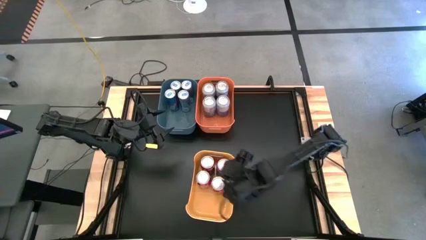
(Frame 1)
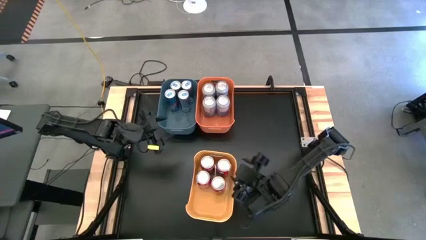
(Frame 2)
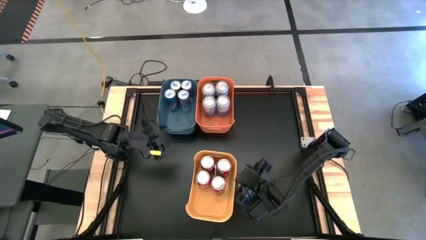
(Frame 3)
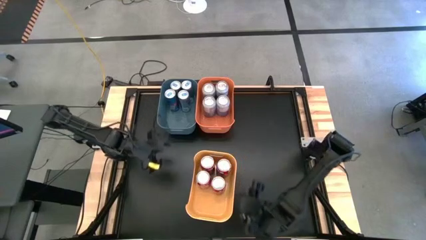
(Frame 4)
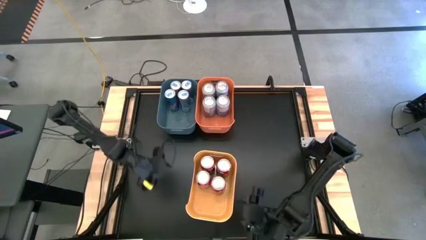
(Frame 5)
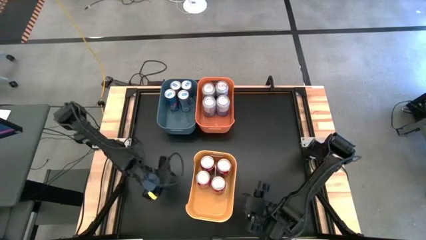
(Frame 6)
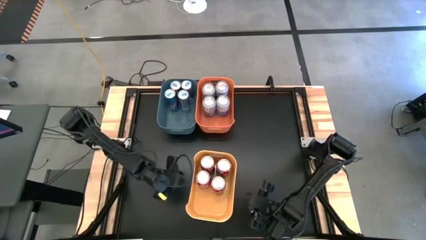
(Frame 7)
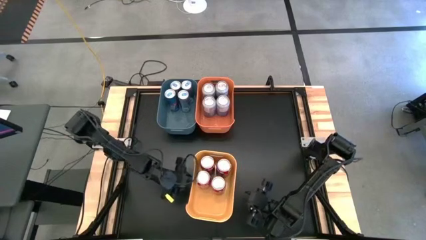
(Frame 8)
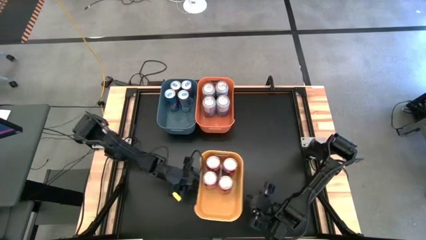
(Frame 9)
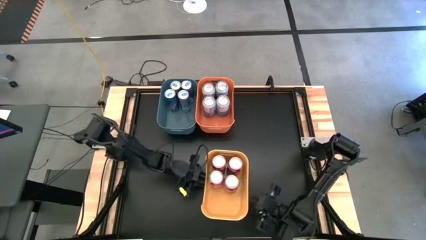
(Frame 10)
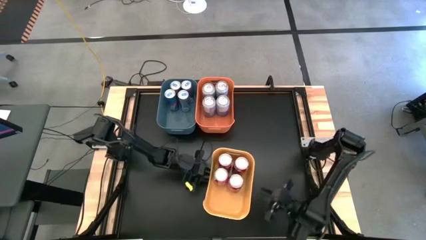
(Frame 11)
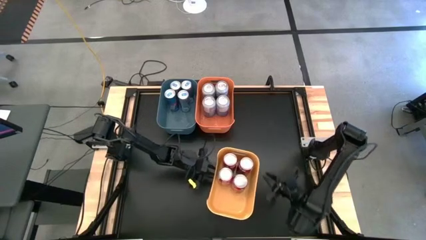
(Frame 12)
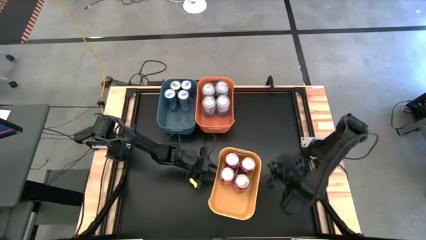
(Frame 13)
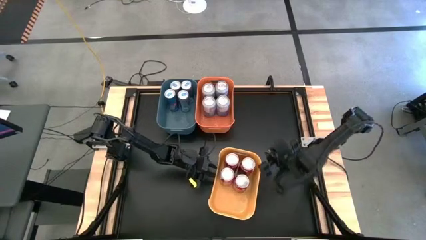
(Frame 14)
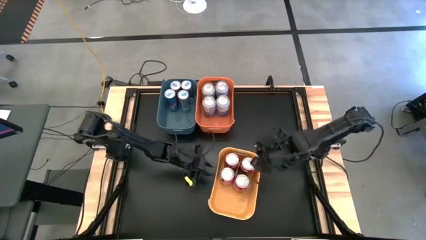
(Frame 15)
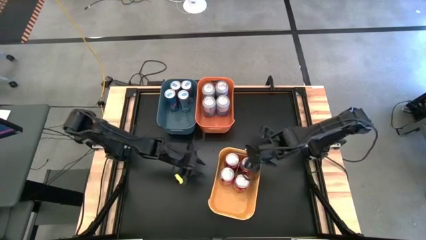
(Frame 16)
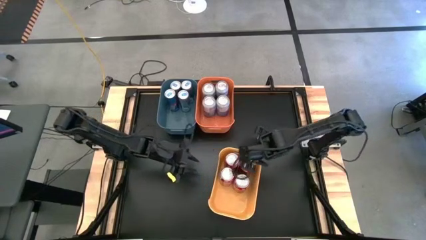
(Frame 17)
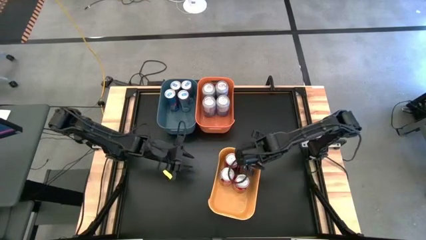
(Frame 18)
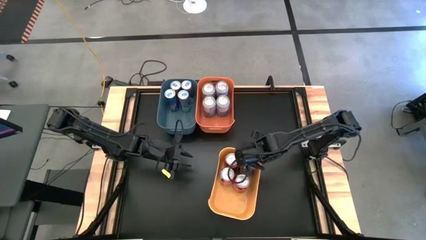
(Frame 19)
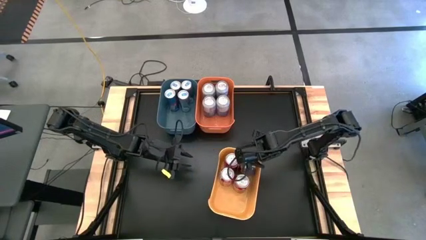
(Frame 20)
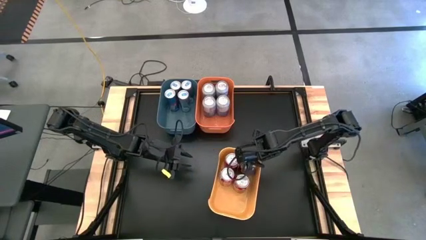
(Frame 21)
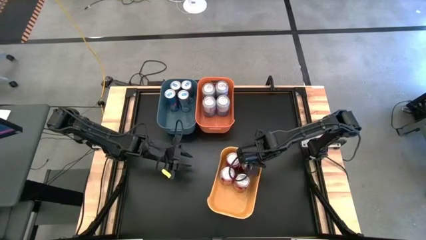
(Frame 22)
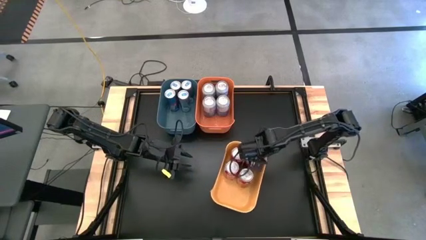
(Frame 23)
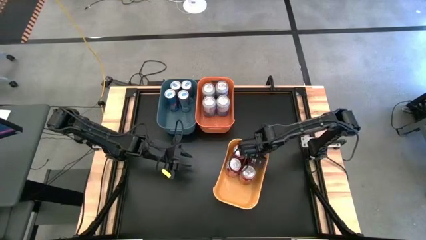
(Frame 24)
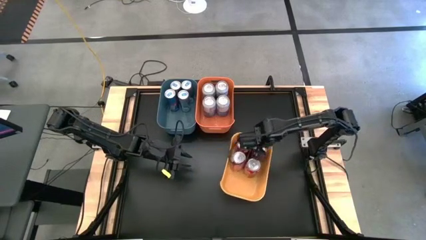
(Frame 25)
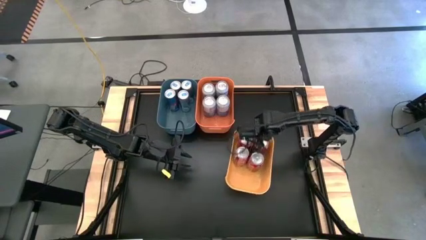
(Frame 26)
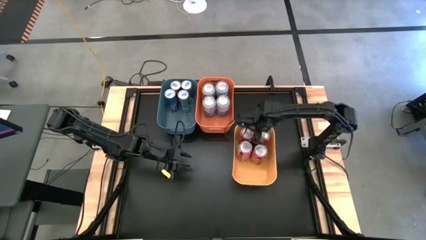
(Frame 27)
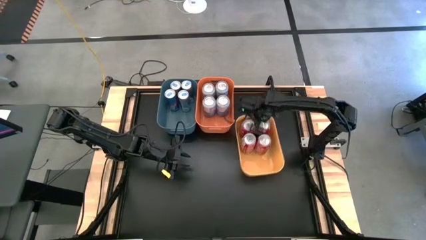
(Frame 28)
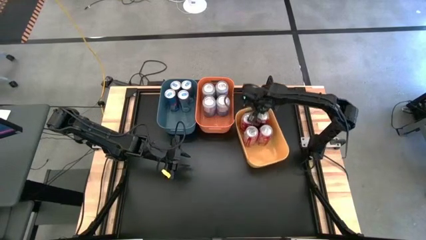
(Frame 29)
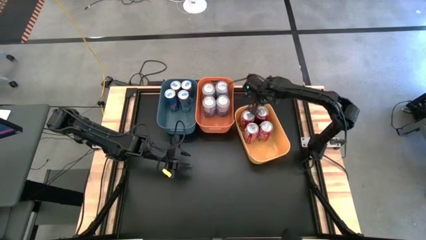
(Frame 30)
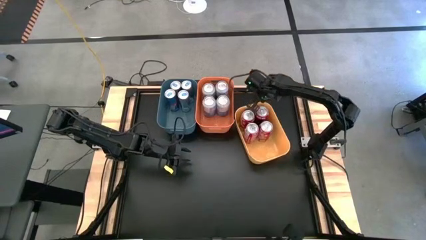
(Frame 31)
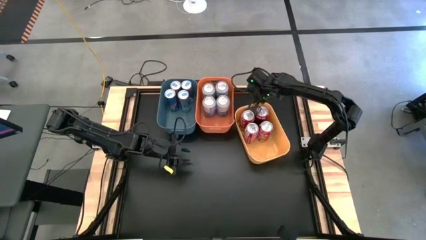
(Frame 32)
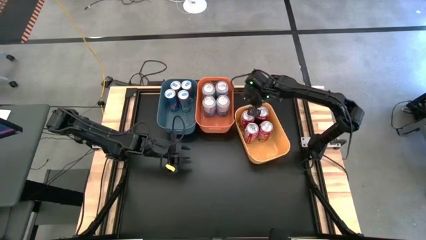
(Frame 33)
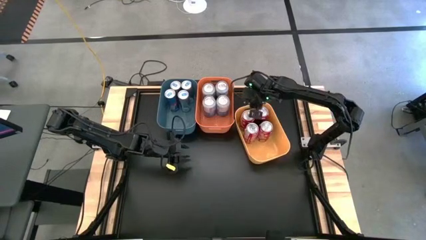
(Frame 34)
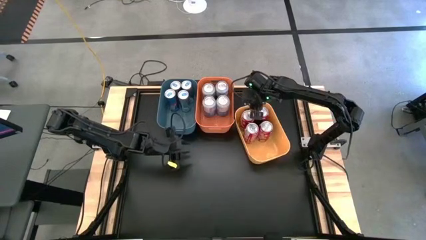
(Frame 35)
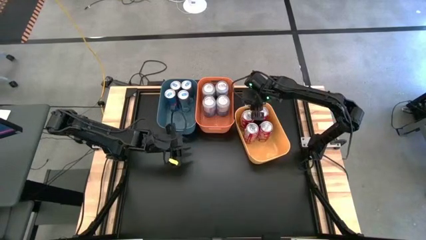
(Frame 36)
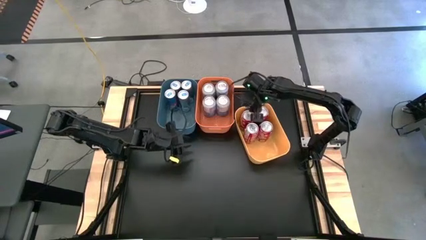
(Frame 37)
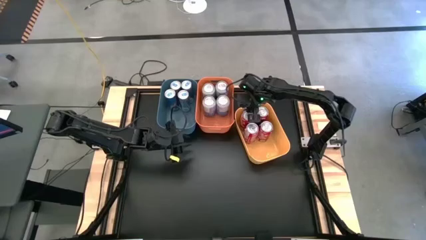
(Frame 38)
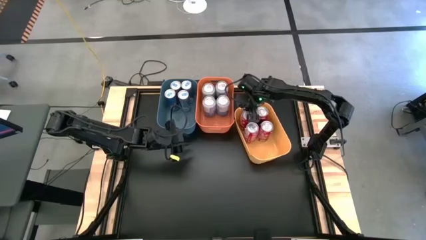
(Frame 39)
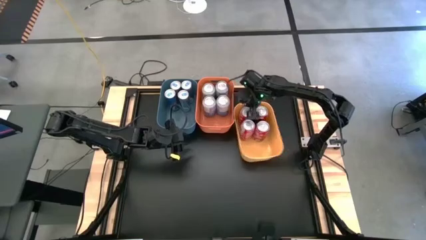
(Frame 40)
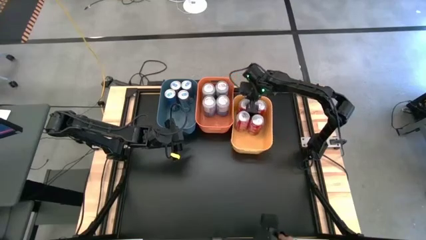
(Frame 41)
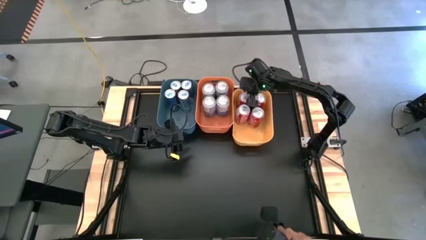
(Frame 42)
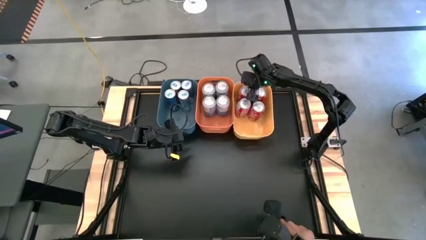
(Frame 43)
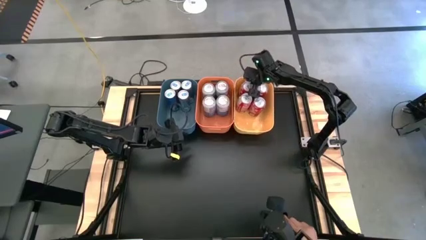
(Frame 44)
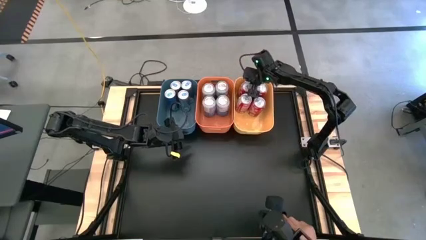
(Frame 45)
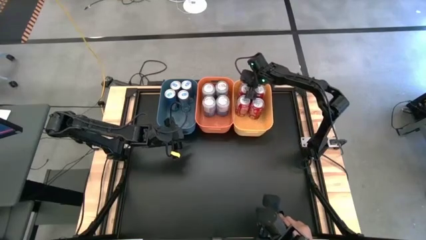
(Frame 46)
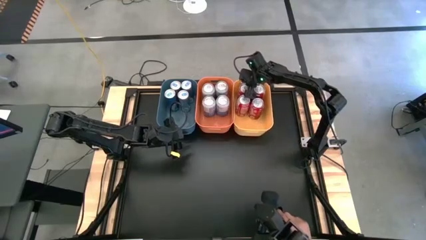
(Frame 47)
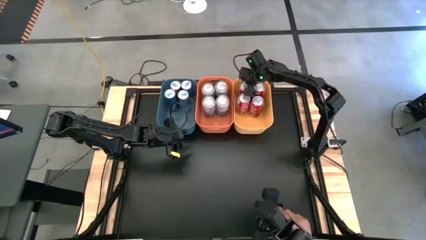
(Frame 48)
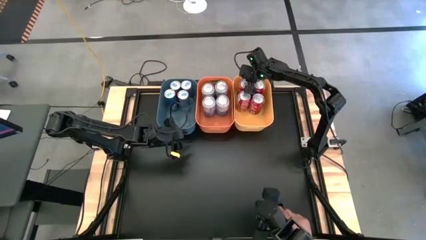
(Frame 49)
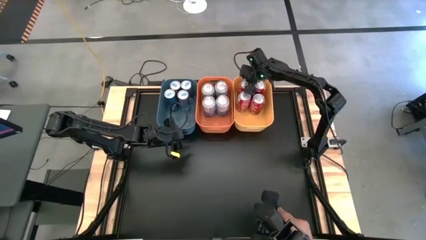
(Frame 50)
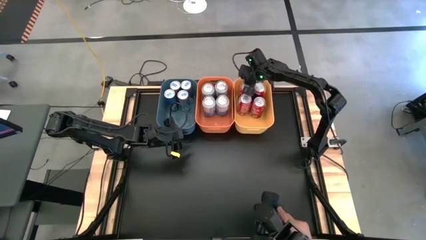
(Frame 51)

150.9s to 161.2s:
Task: Sort soda cans
Move the yellow bin to the top right of the table
